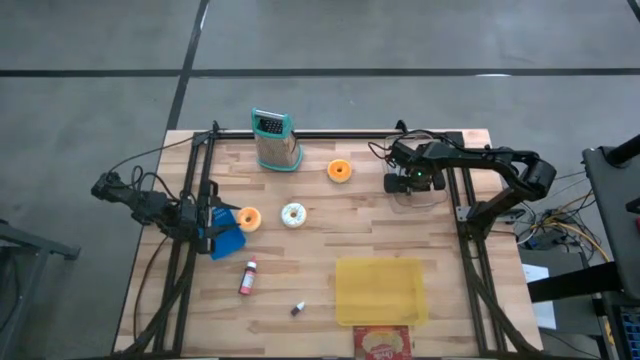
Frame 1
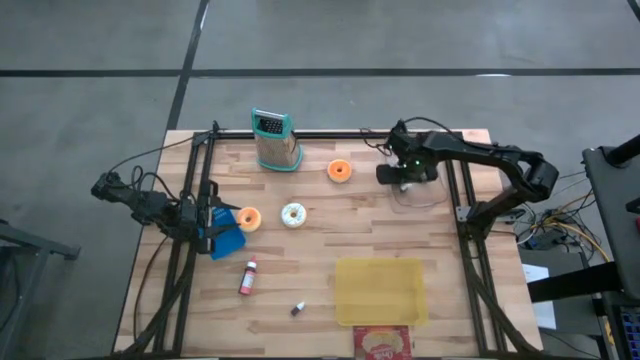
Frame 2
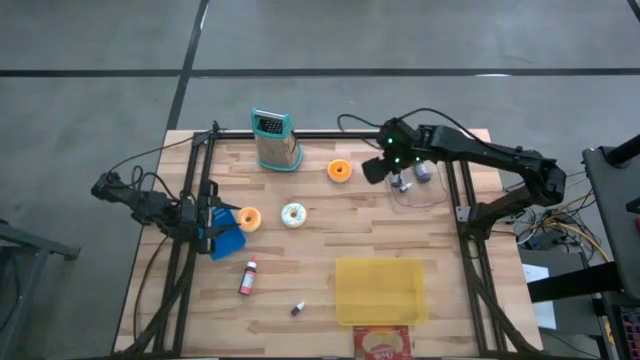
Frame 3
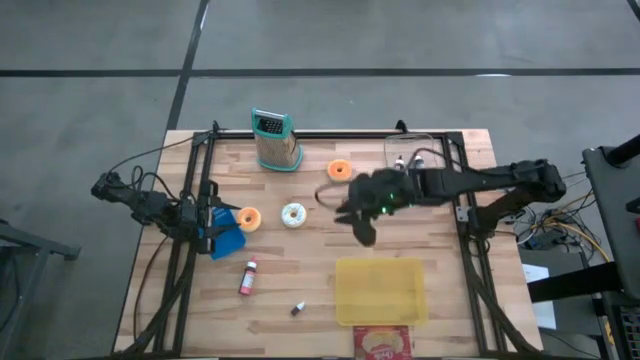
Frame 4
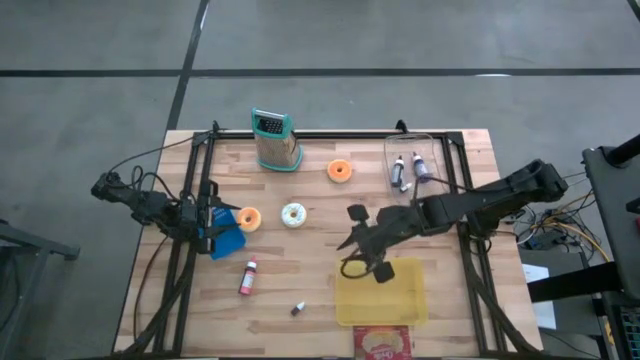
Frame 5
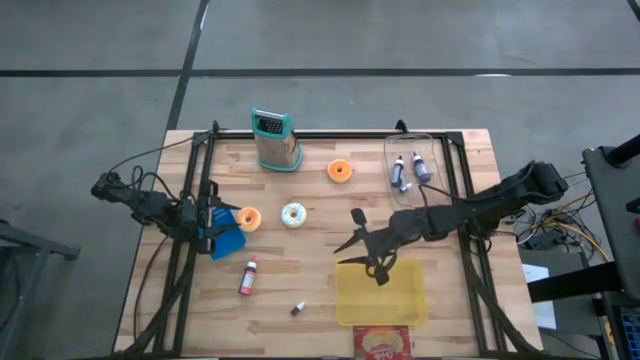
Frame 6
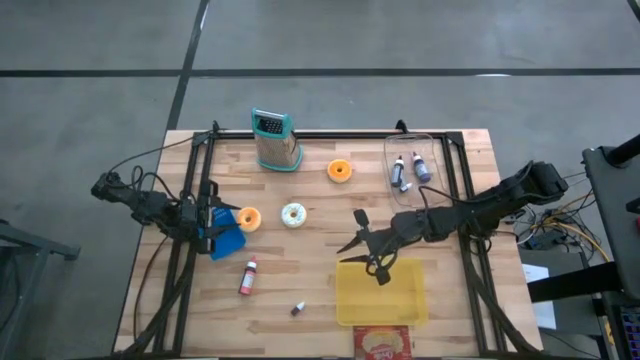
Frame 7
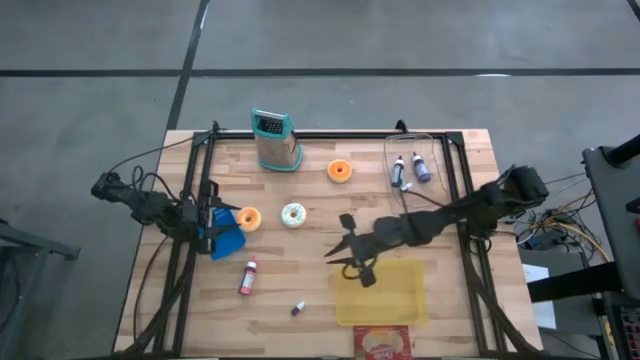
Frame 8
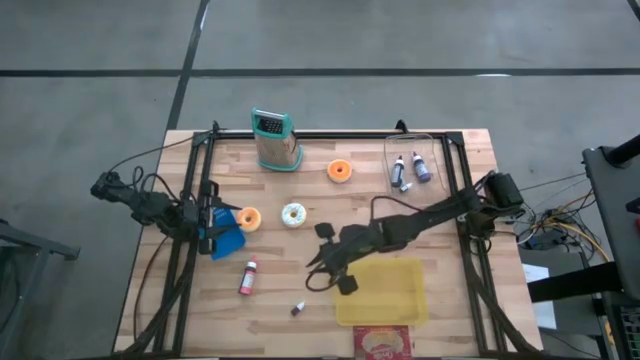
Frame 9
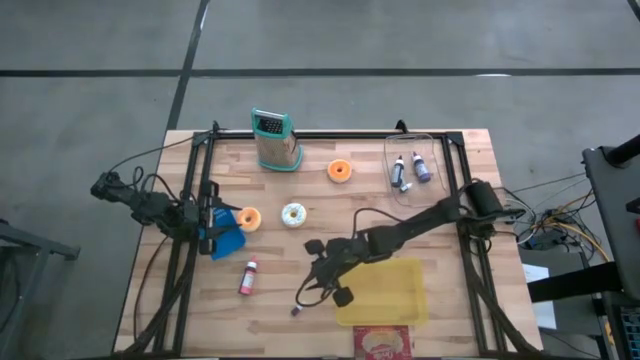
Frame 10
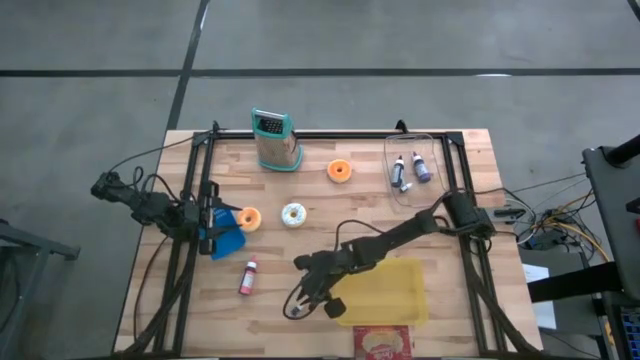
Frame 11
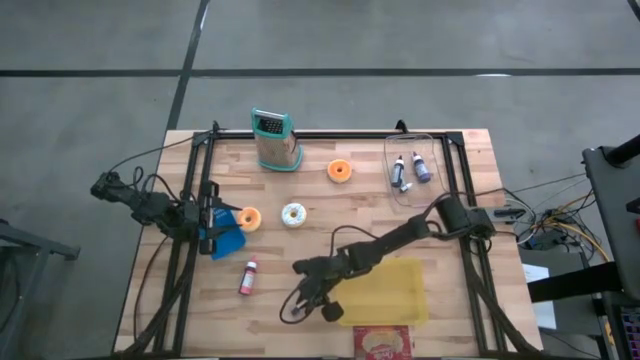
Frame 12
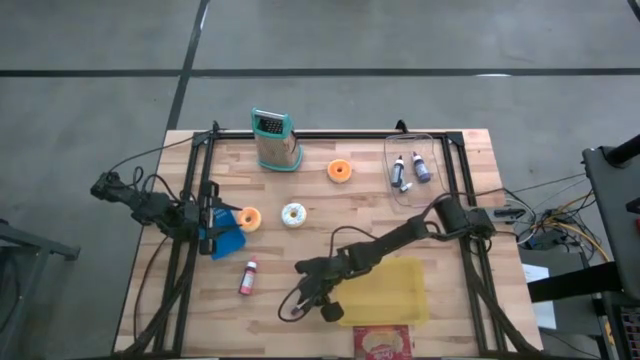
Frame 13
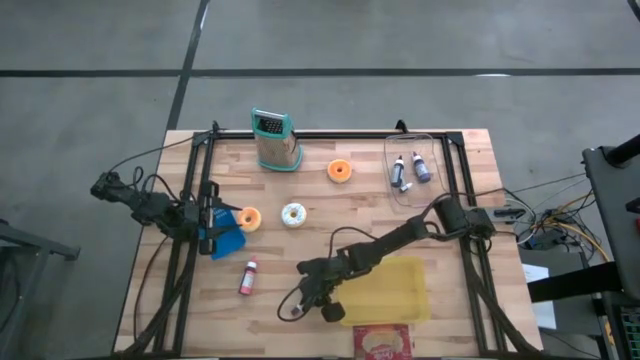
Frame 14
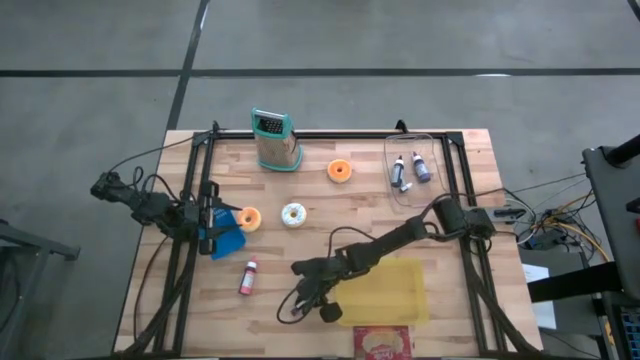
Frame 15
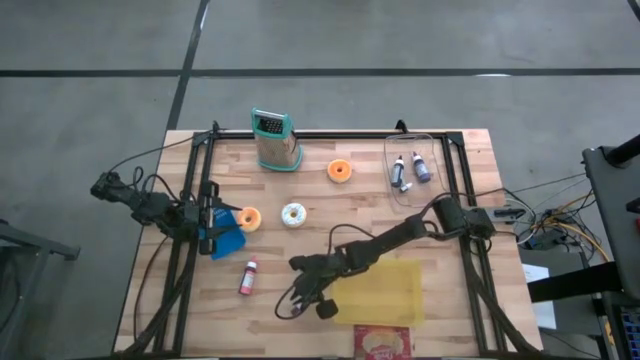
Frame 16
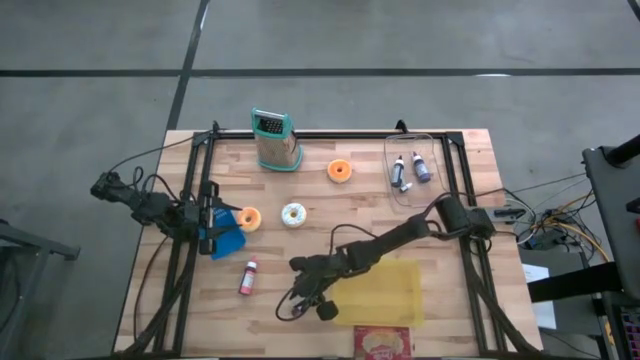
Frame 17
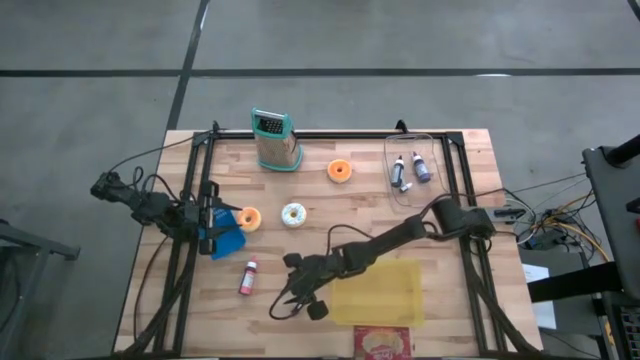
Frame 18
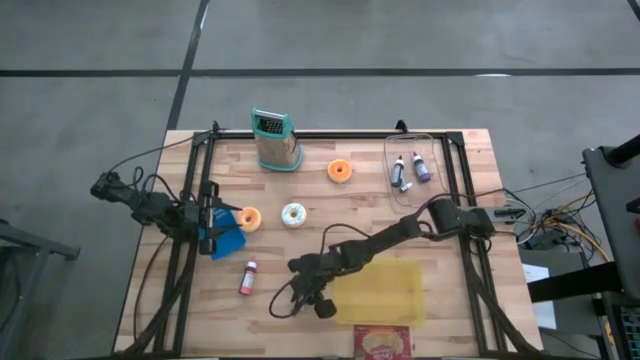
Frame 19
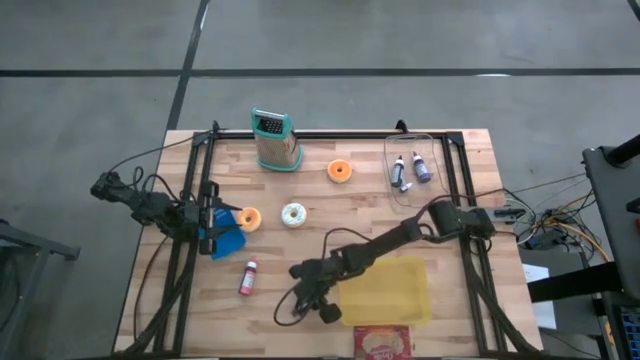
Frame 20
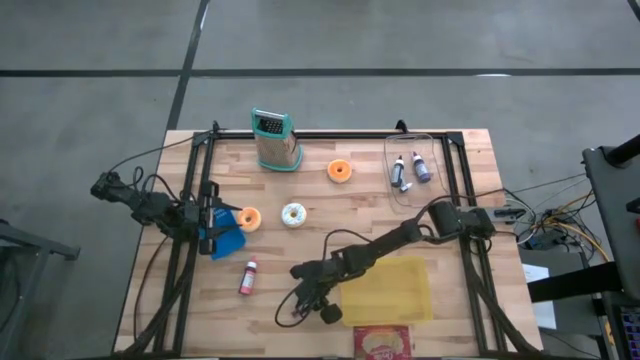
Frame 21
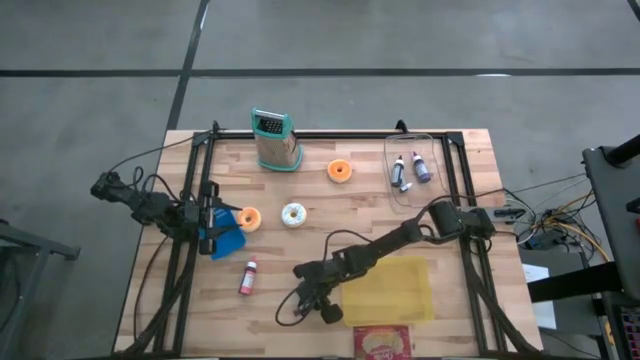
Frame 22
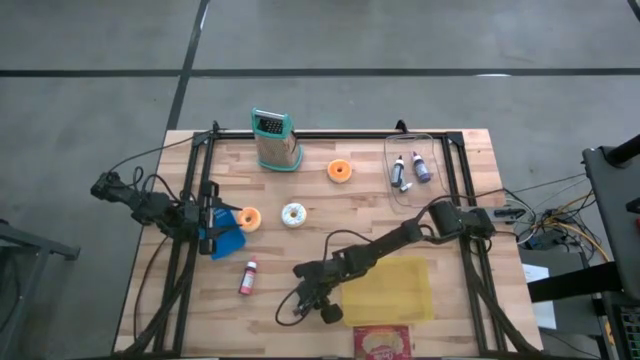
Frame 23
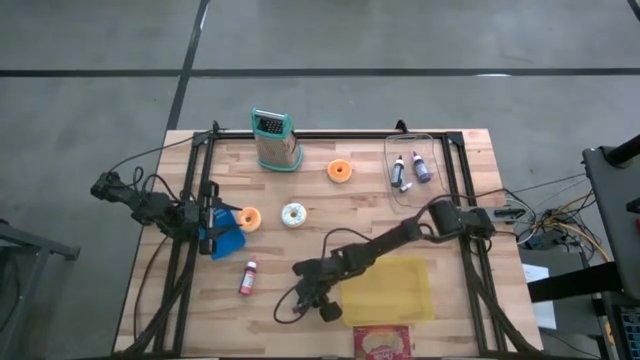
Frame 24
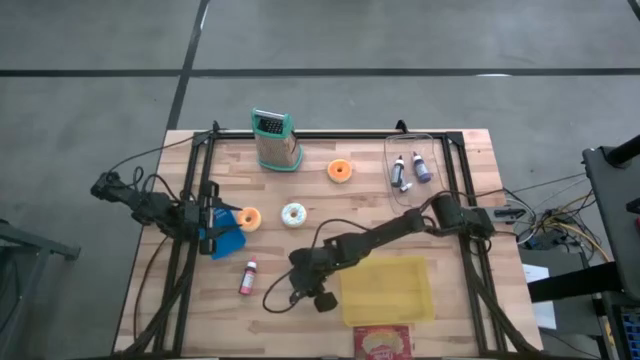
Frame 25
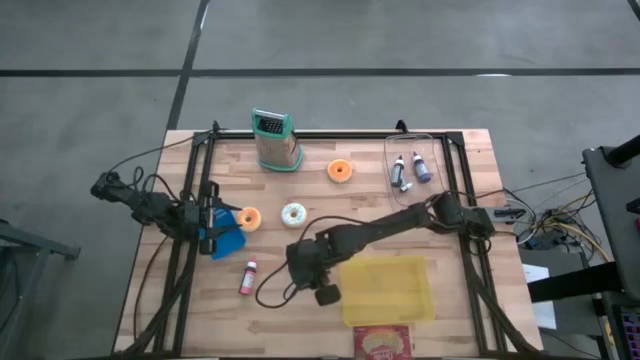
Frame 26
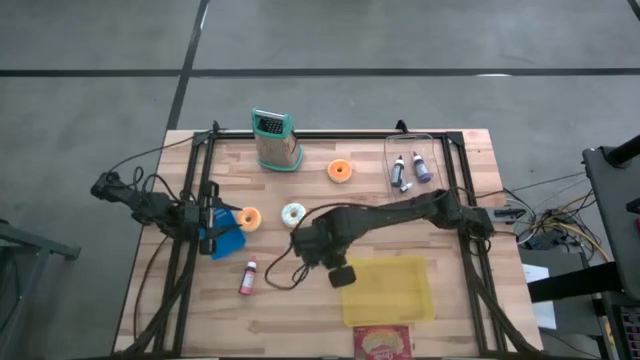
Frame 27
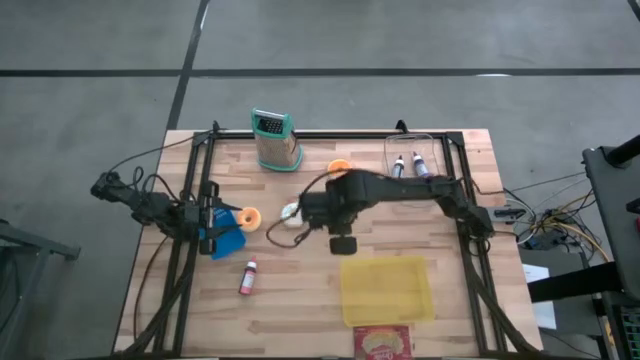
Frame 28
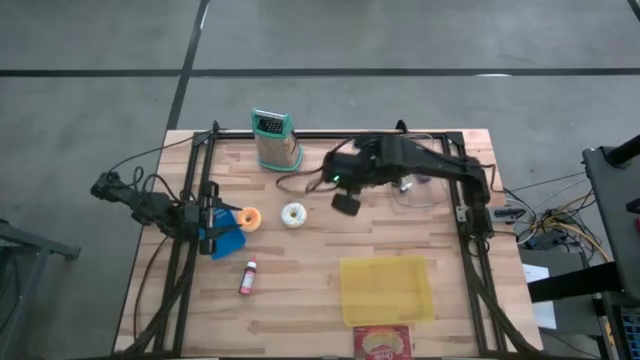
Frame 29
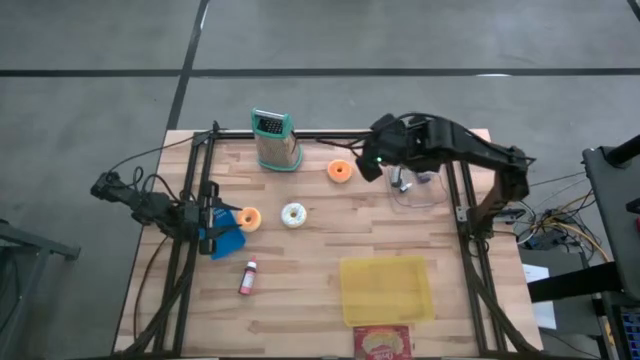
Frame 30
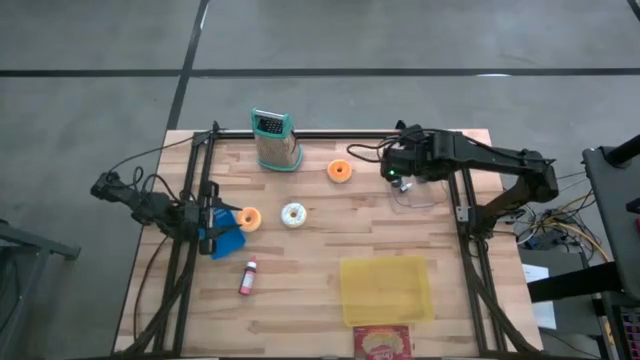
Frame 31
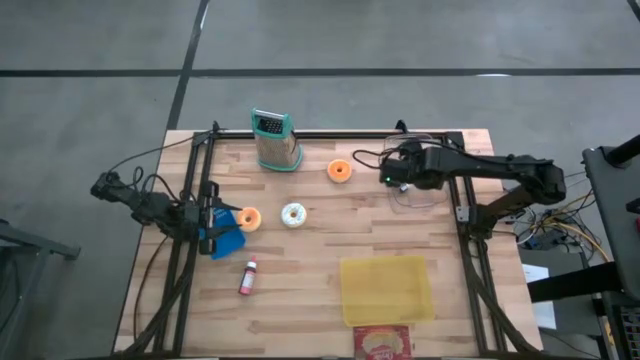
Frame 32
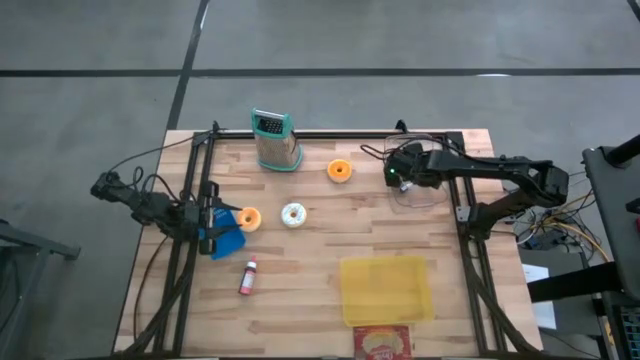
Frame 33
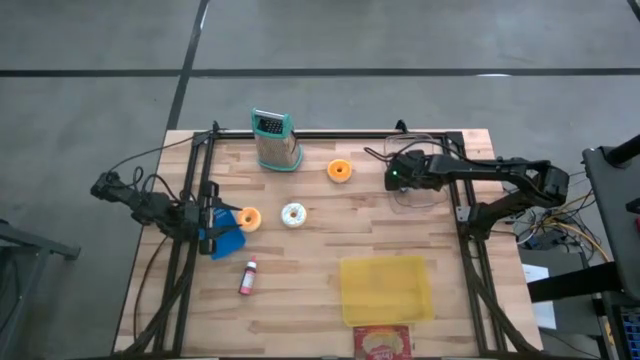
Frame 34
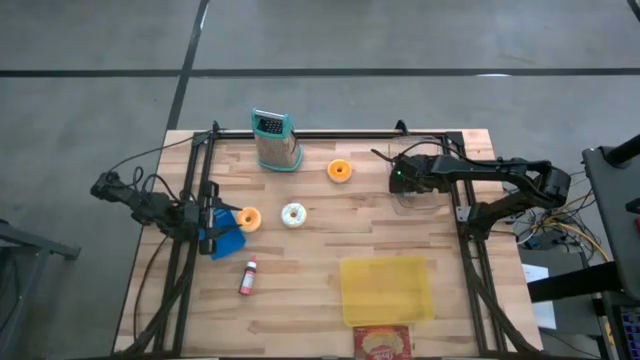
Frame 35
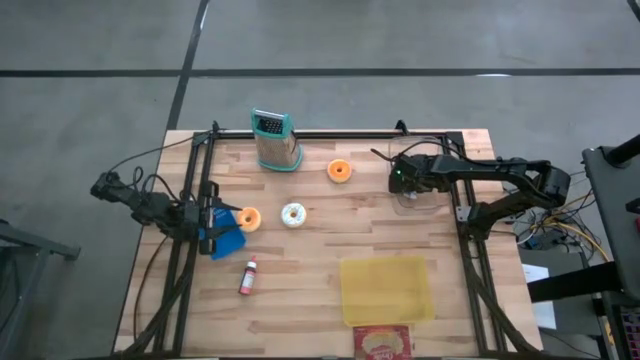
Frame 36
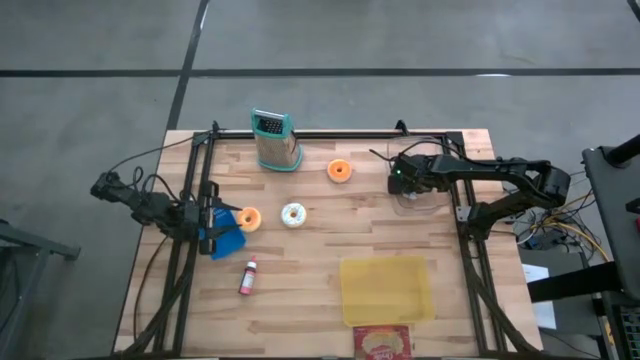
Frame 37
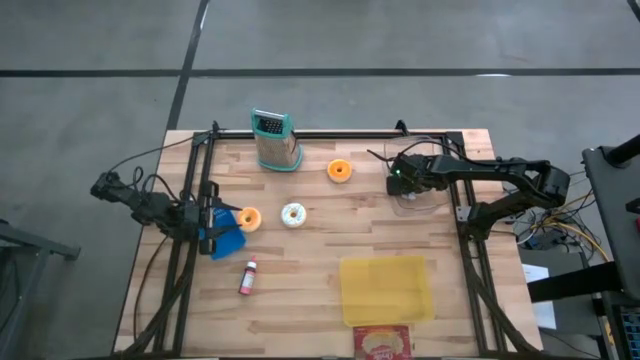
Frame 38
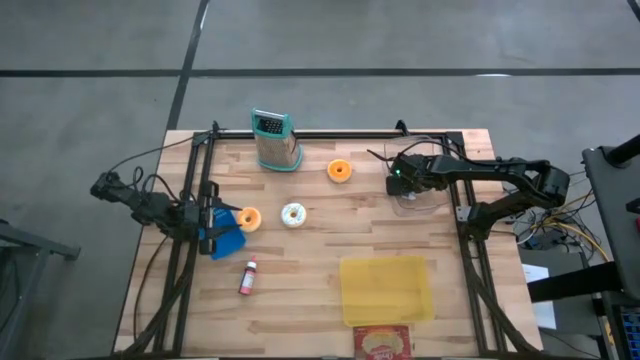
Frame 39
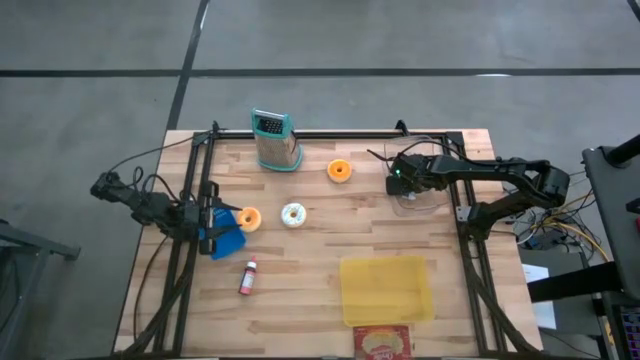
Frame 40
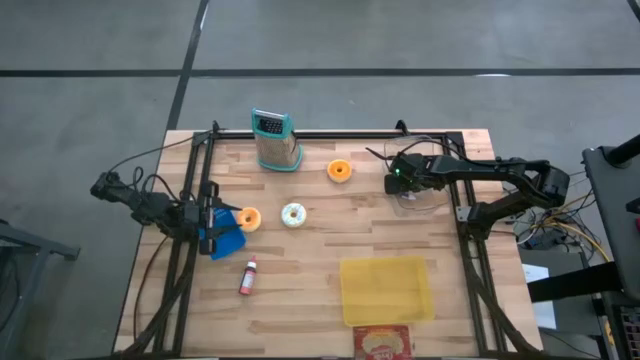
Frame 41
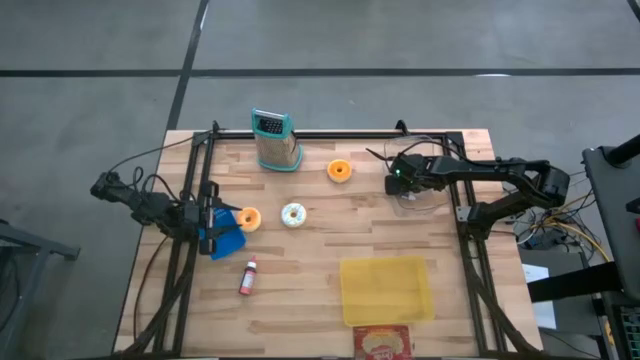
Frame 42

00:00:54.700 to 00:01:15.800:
Task: Pick & Place Food Item
Put the red food coloring bottle into the transparent bin

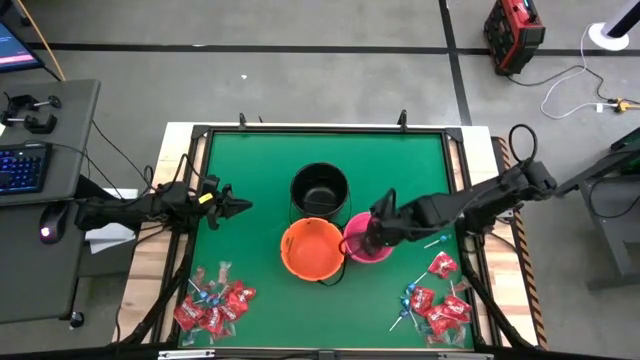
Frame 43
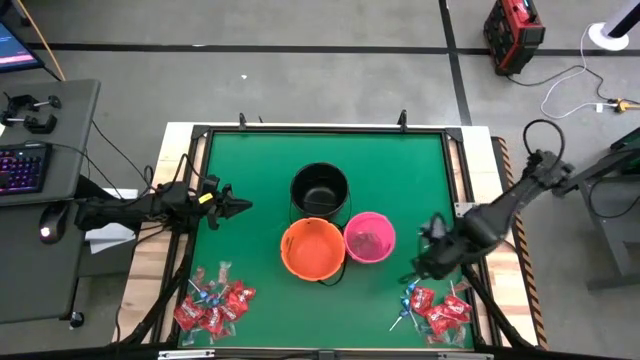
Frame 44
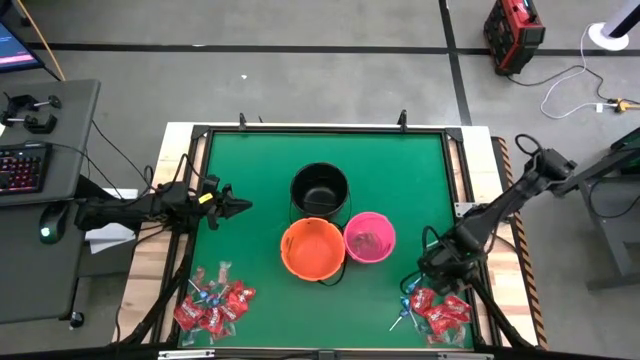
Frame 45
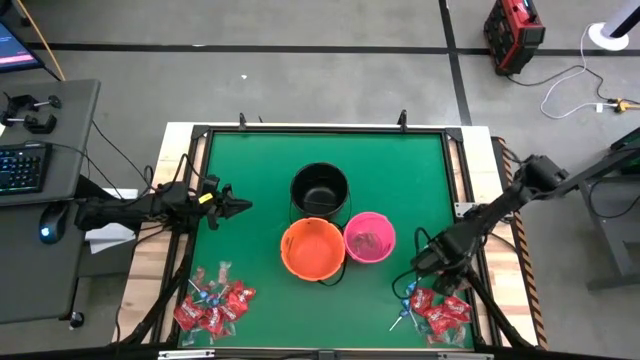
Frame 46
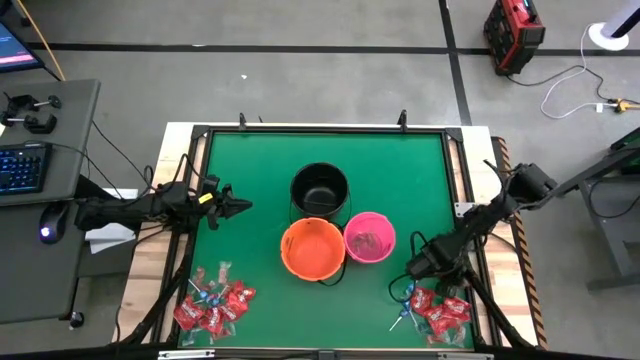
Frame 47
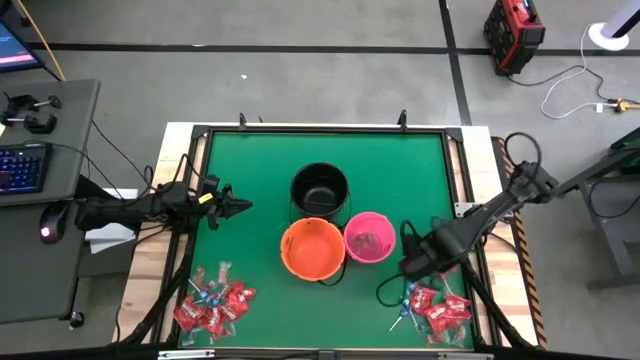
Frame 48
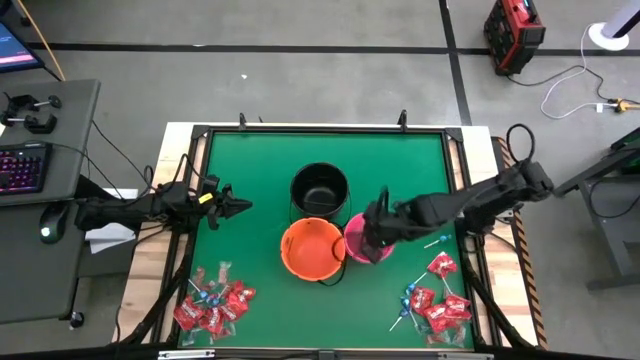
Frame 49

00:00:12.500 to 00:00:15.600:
Task: Sort candy by brand, put in halloween buckets
Put the orange gummy into the pink bucket
